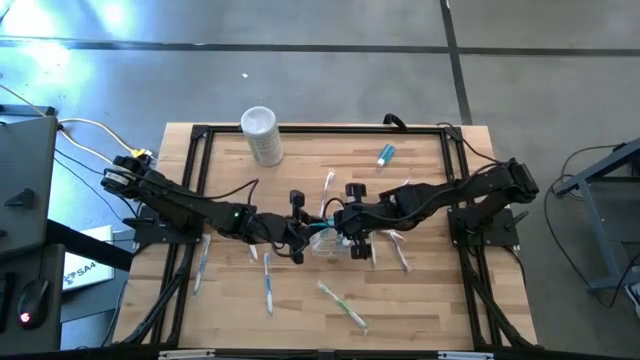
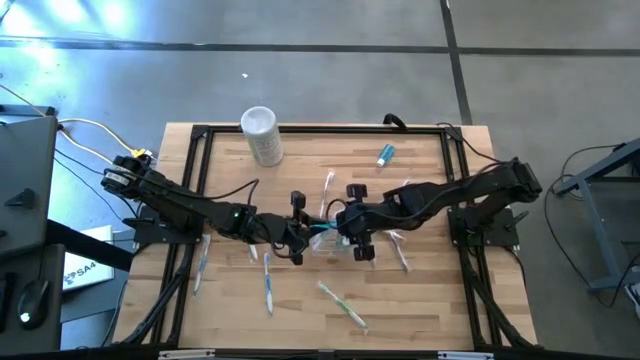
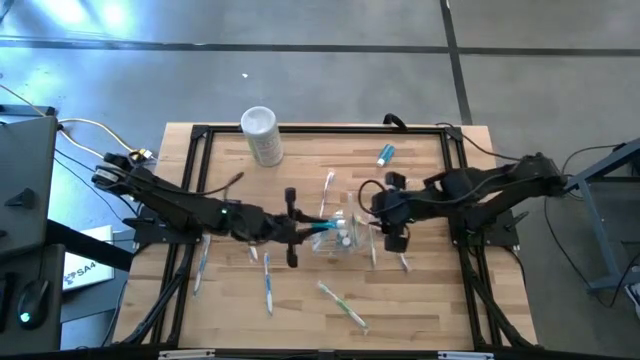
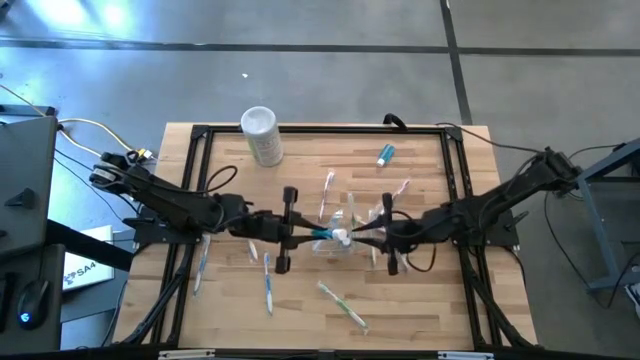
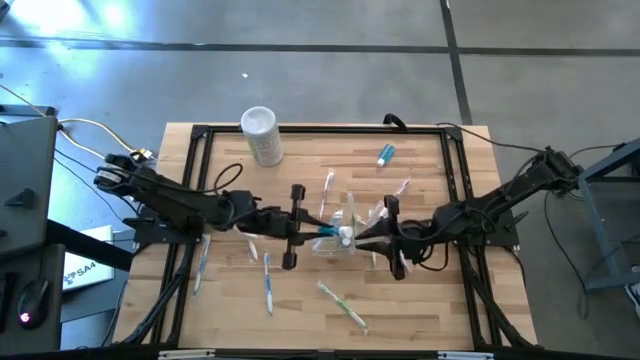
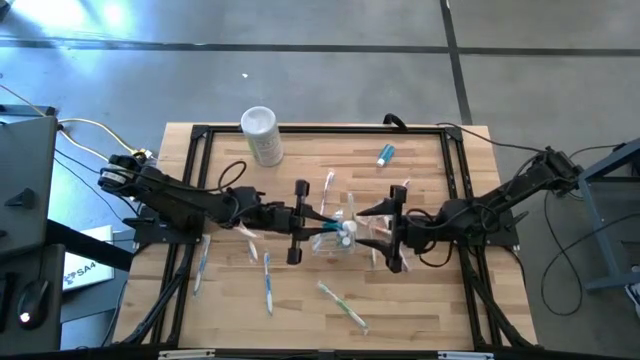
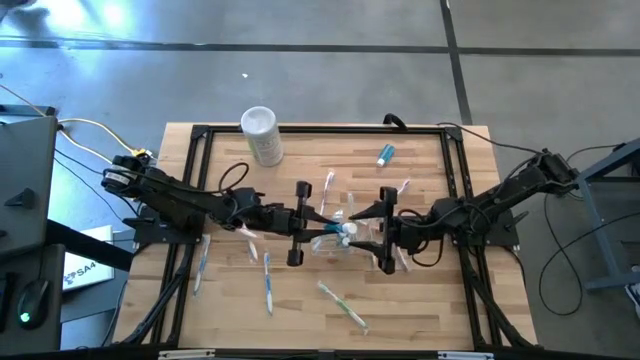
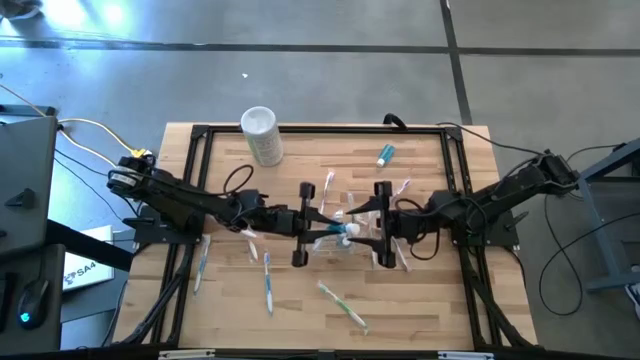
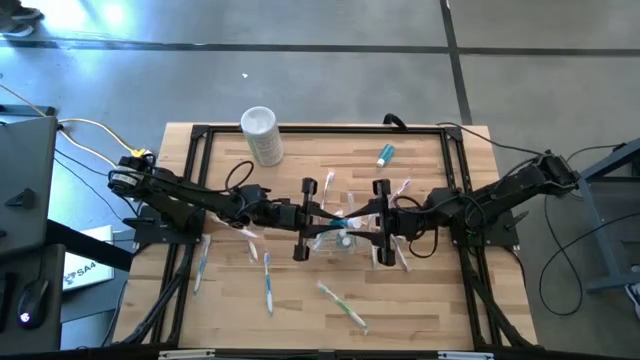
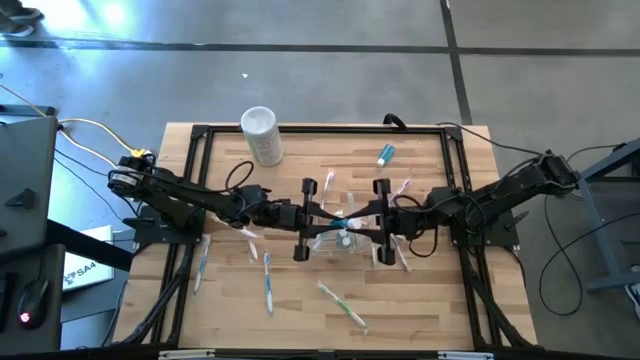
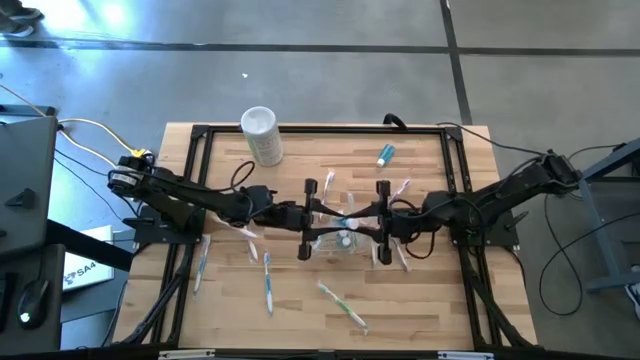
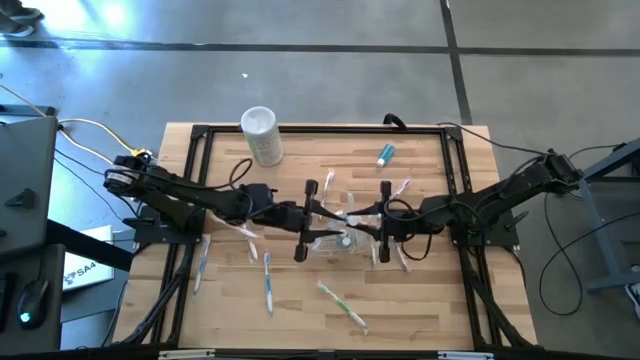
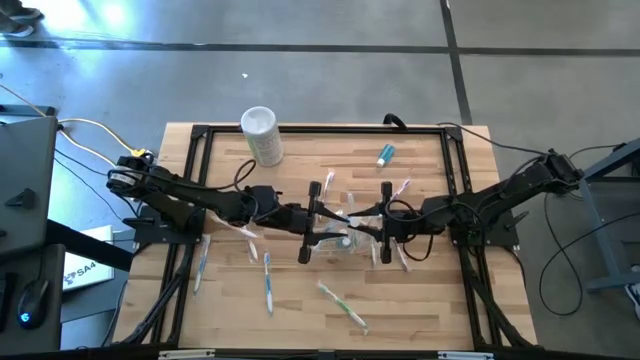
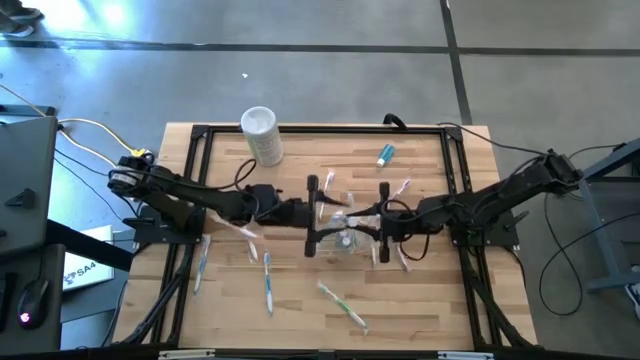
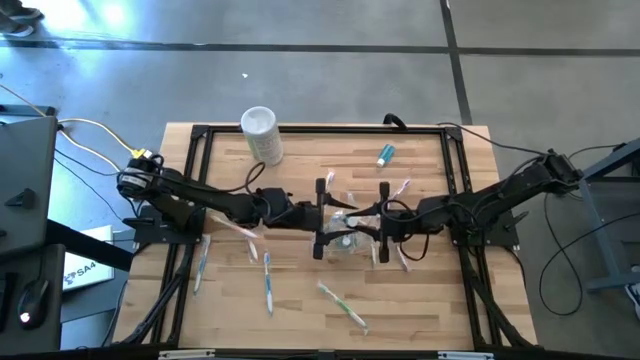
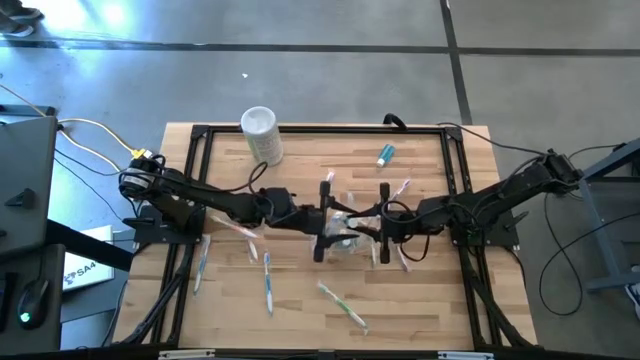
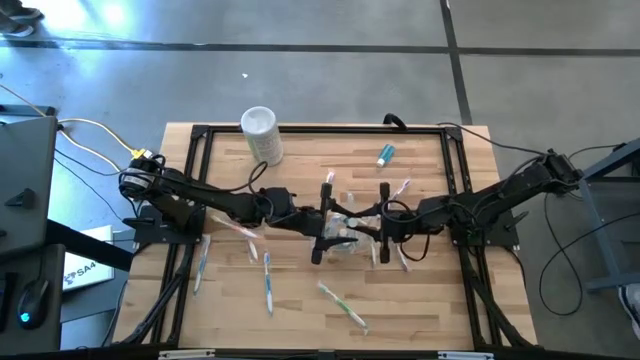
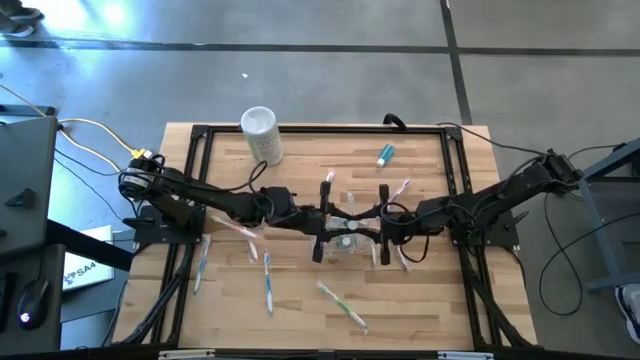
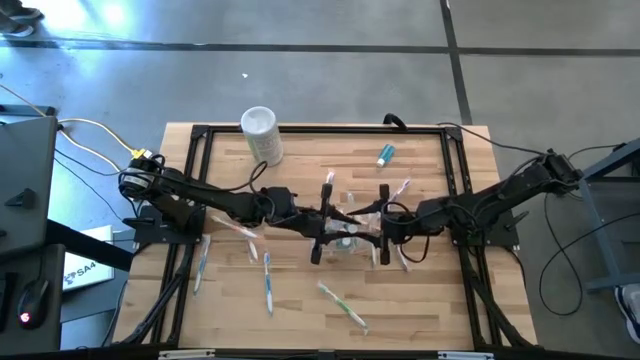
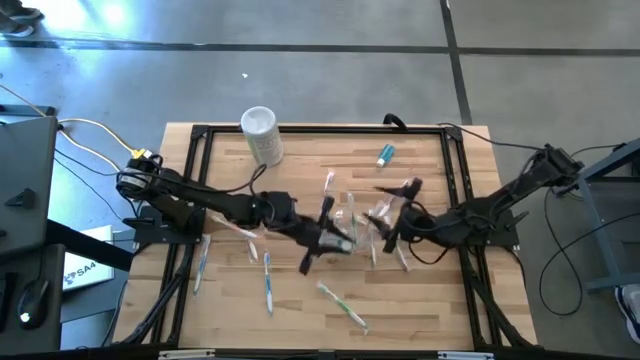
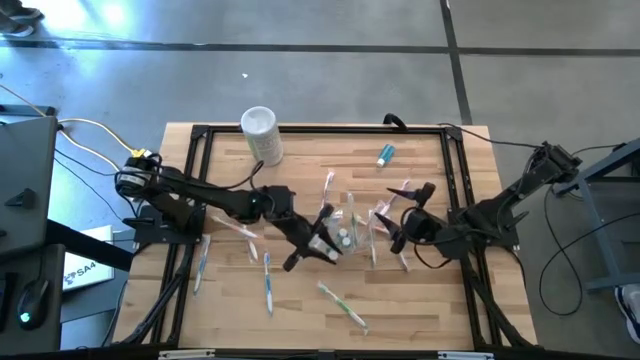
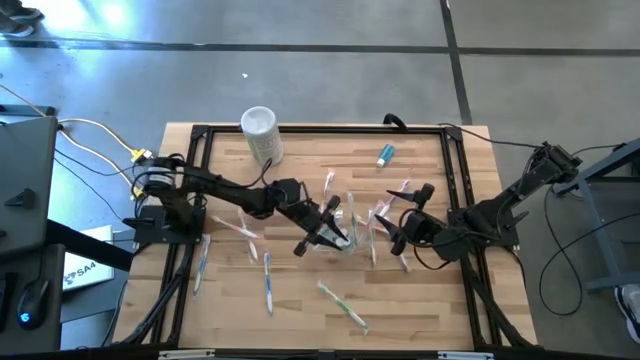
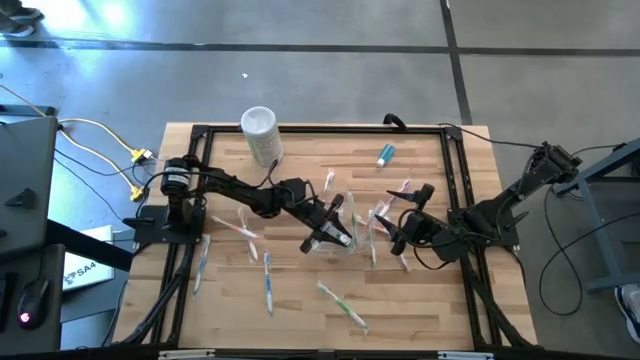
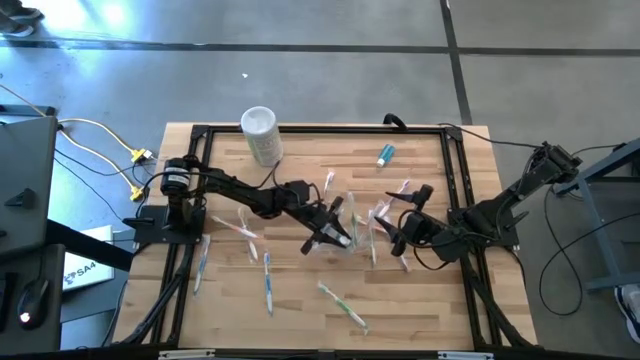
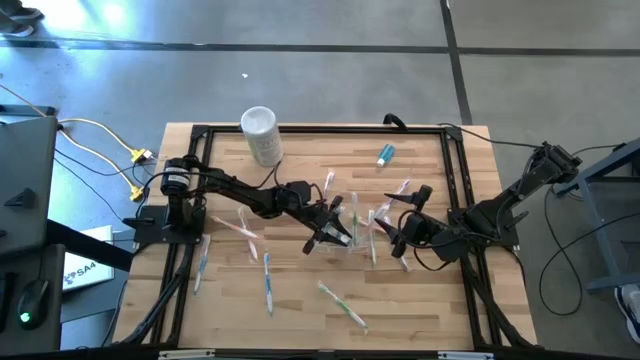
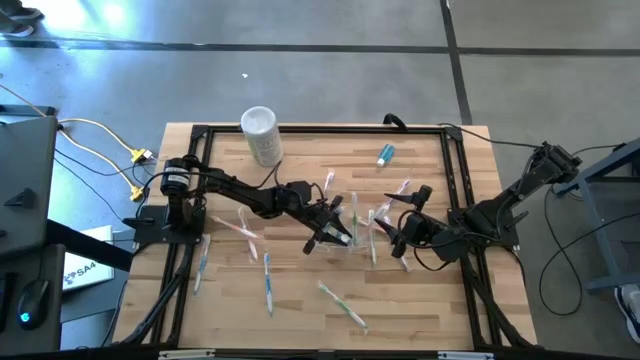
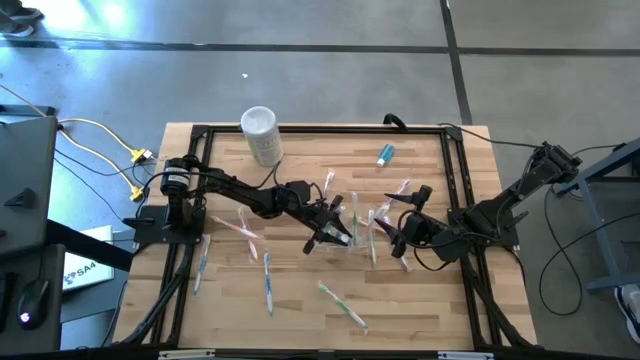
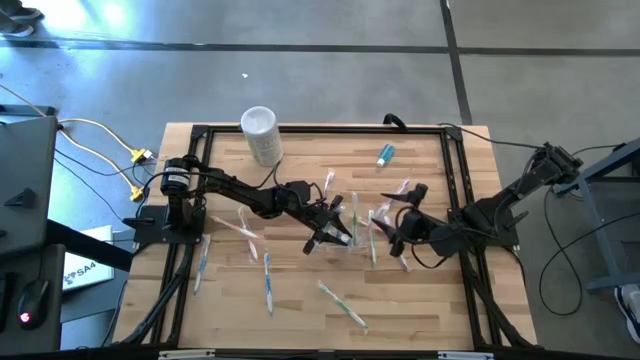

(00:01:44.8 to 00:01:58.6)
Task: Pick & Place toothbrushing station
Put the blue mouthwash into the middle section of the transparent organizer

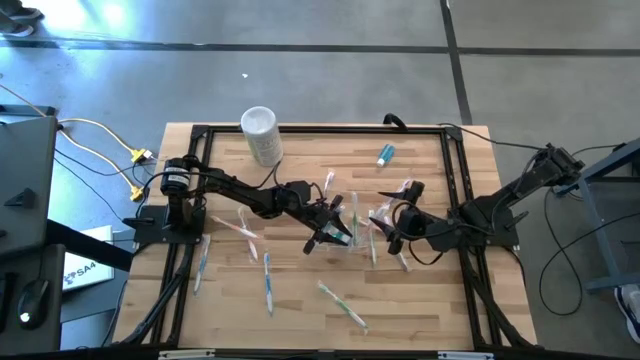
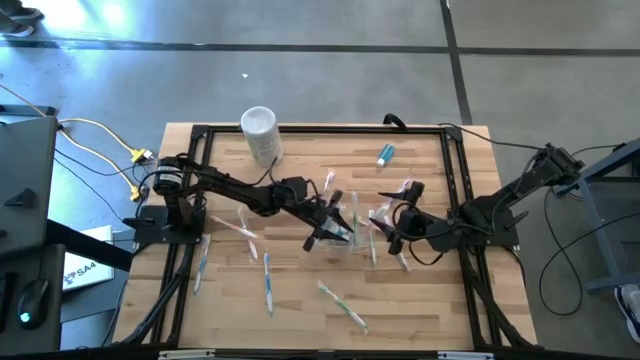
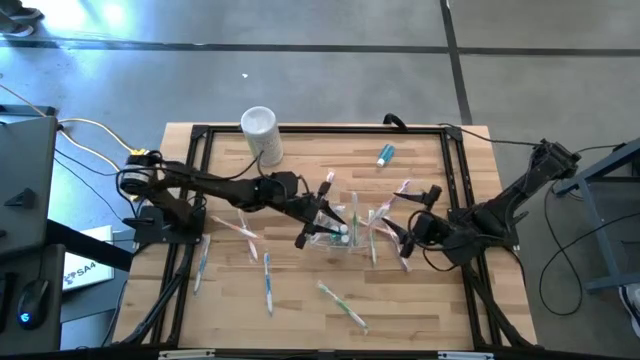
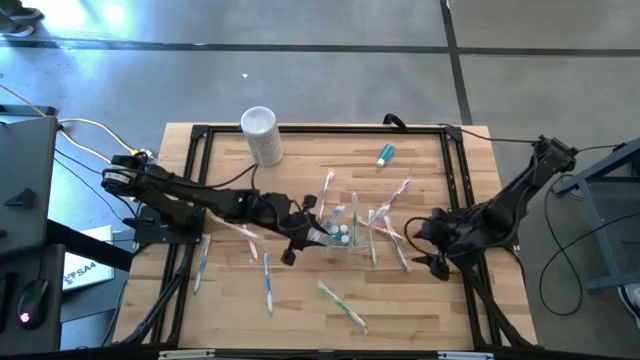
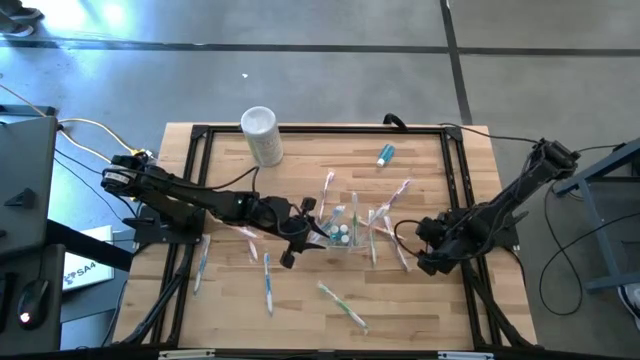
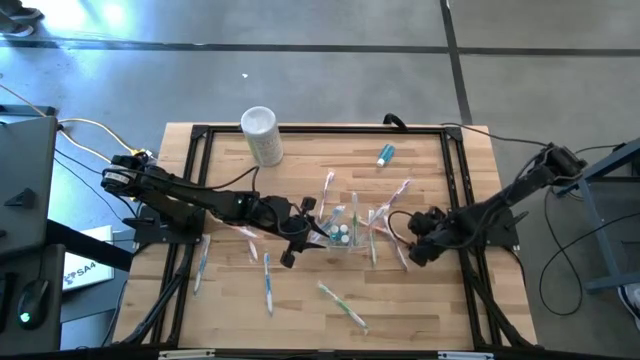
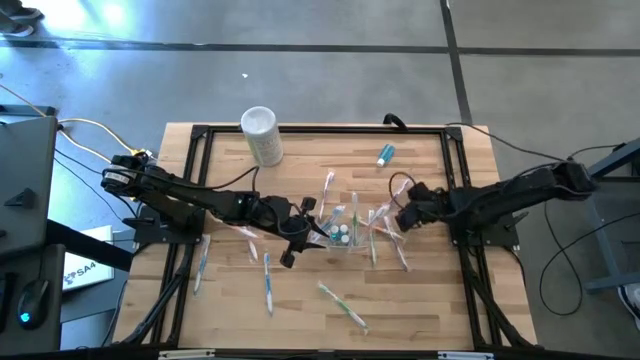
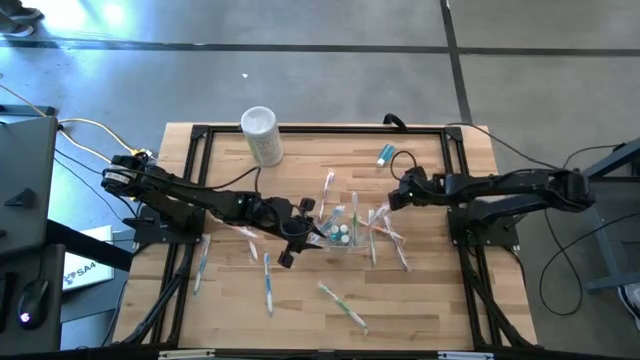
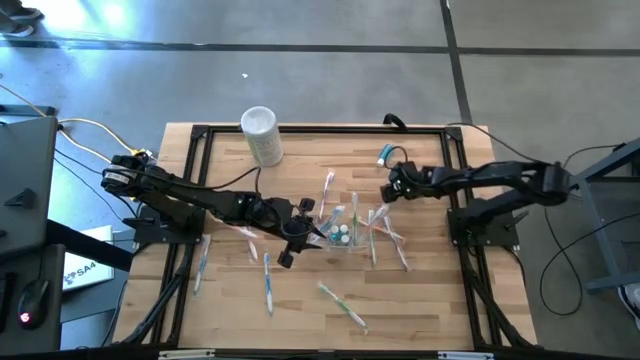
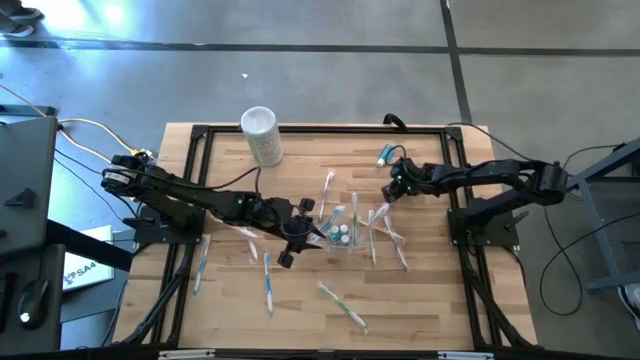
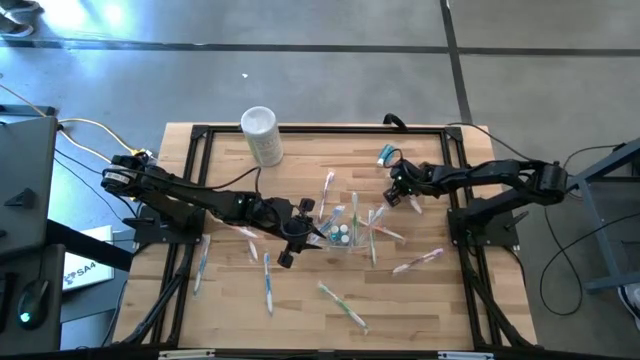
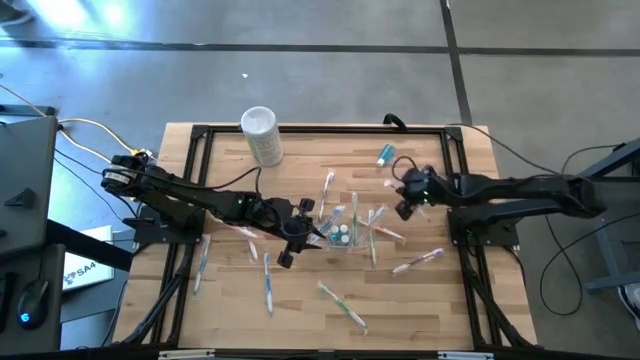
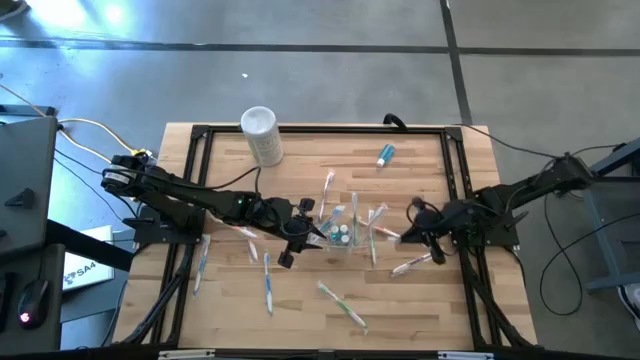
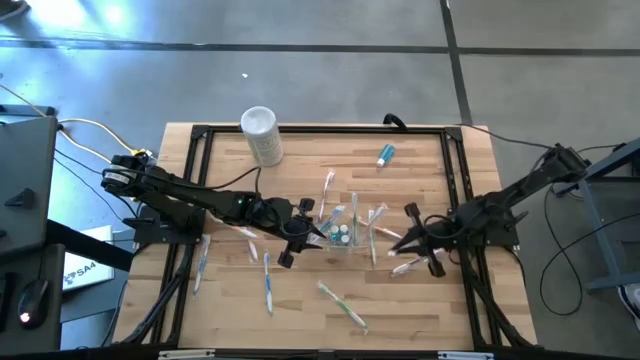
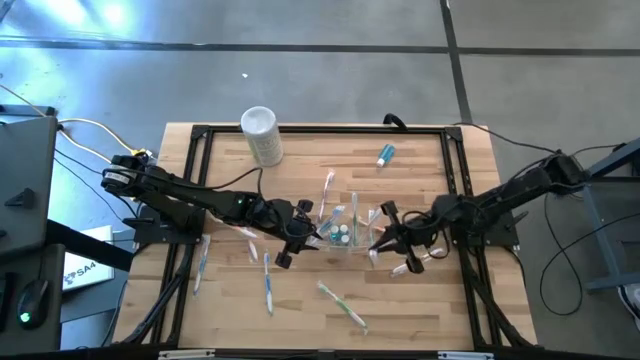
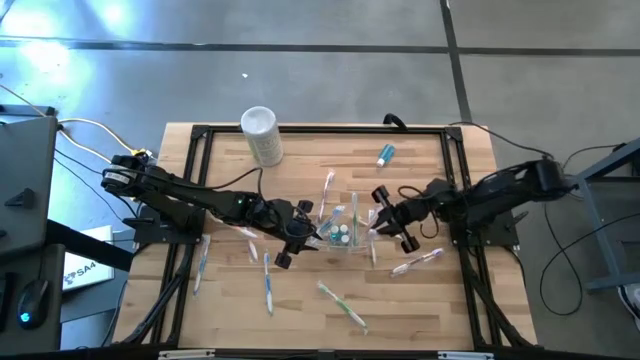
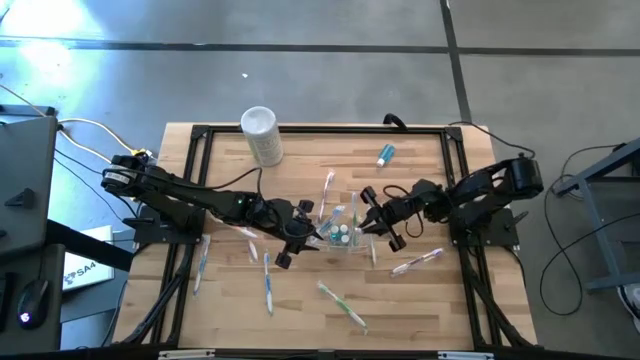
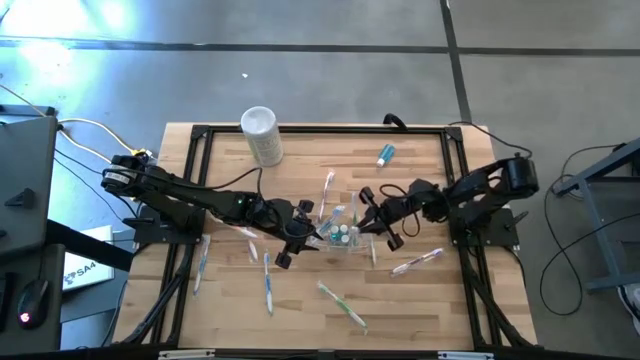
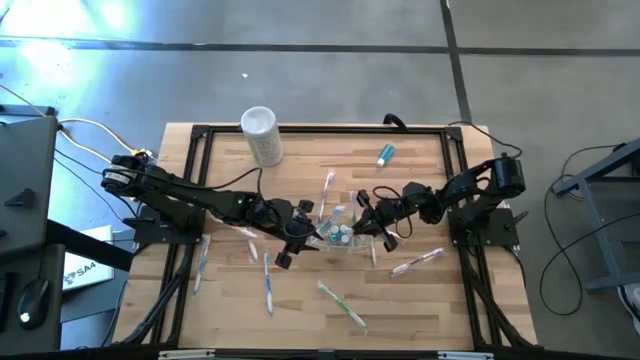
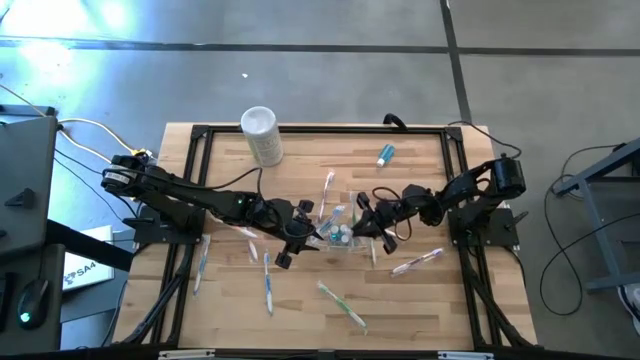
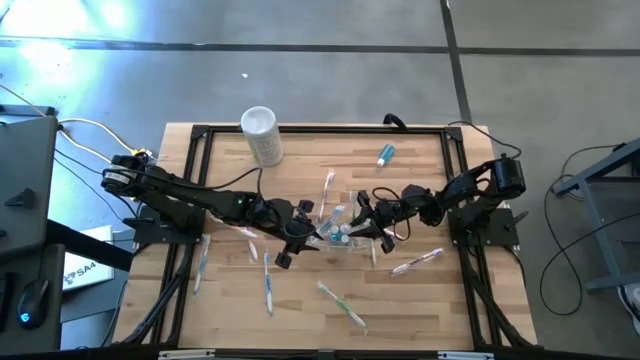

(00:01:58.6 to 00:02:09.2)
Put the violet toothbrush into the right section of the transparent organizer
